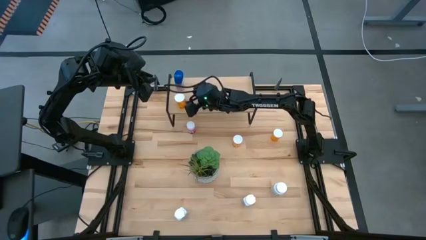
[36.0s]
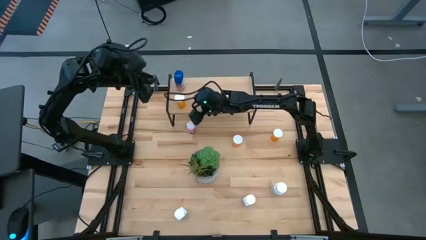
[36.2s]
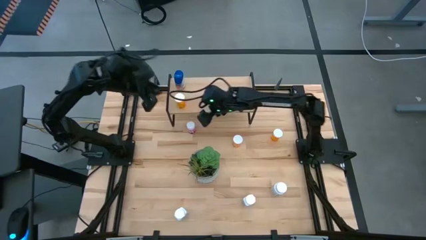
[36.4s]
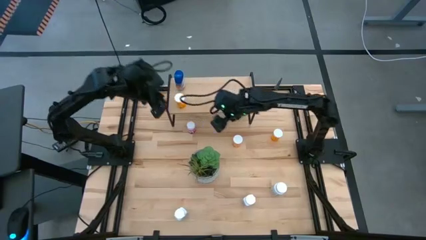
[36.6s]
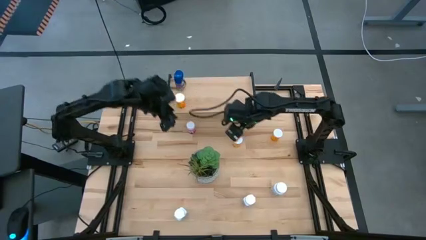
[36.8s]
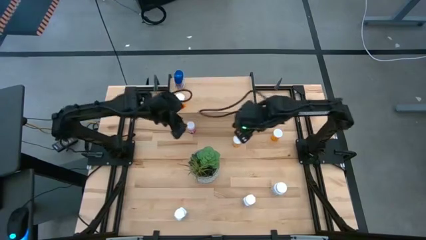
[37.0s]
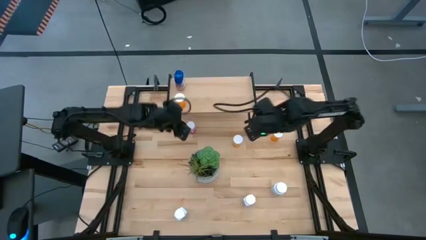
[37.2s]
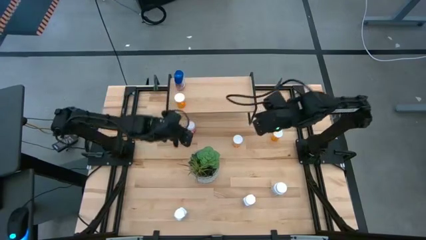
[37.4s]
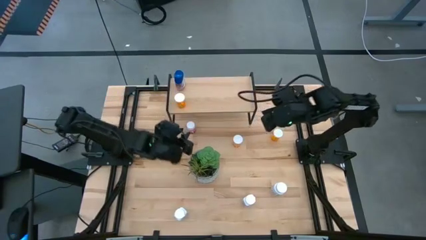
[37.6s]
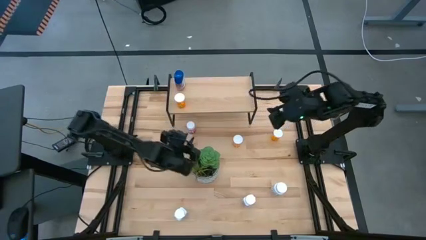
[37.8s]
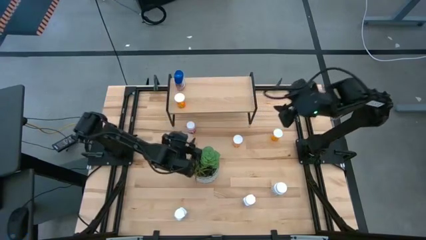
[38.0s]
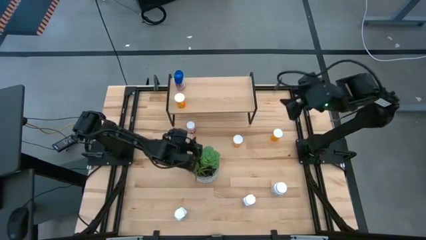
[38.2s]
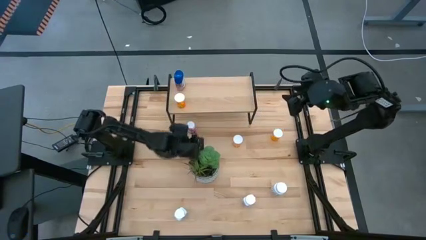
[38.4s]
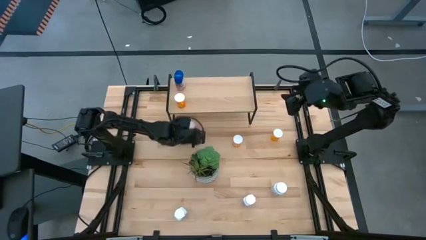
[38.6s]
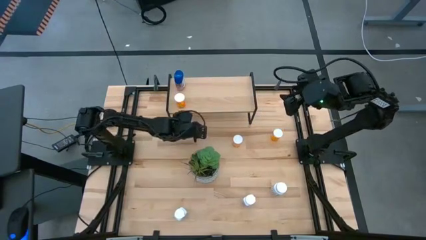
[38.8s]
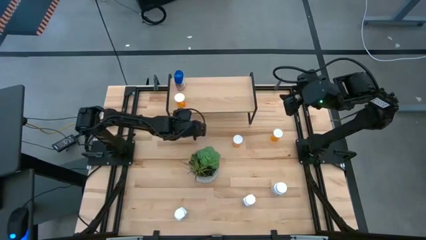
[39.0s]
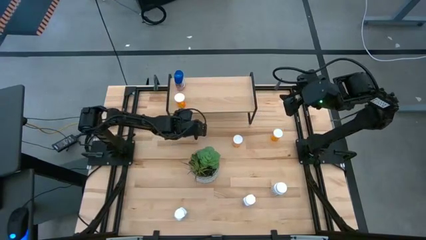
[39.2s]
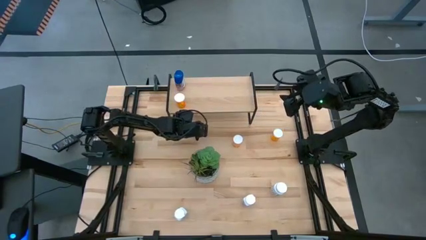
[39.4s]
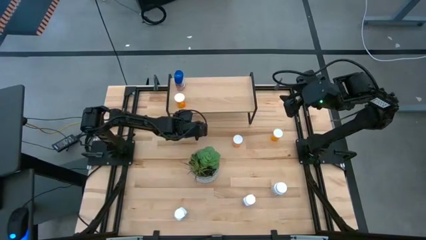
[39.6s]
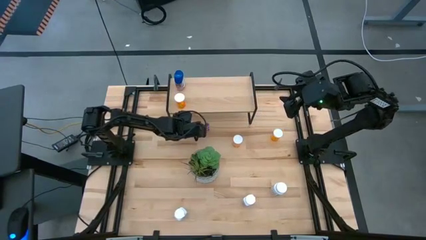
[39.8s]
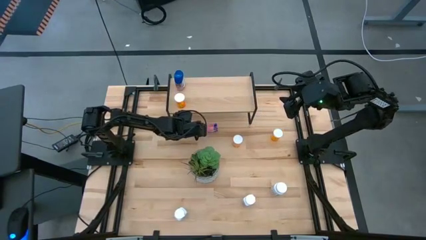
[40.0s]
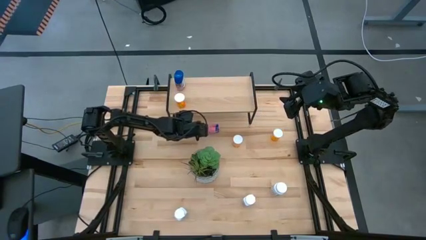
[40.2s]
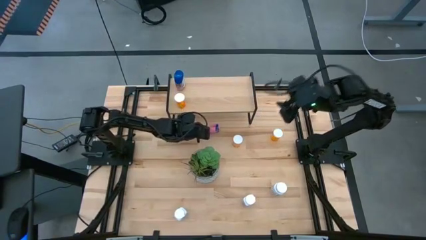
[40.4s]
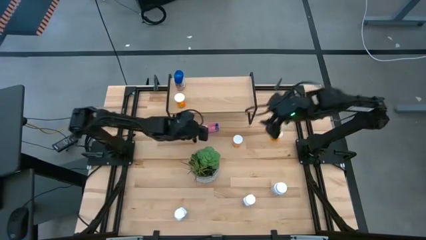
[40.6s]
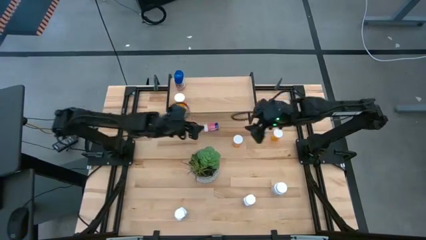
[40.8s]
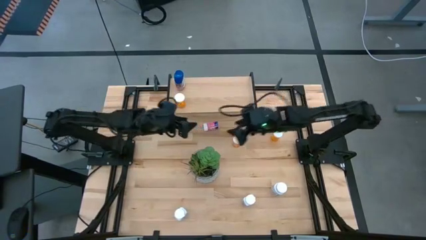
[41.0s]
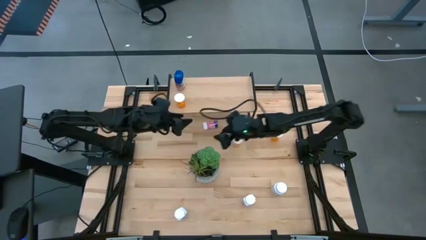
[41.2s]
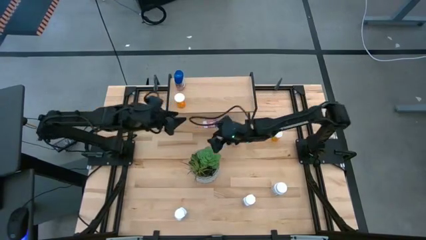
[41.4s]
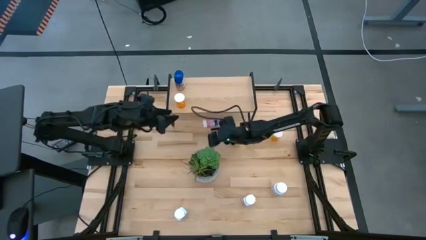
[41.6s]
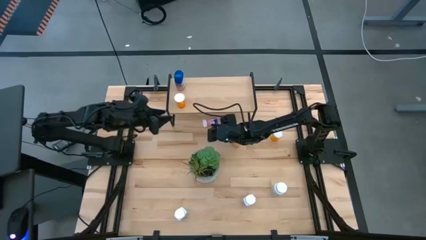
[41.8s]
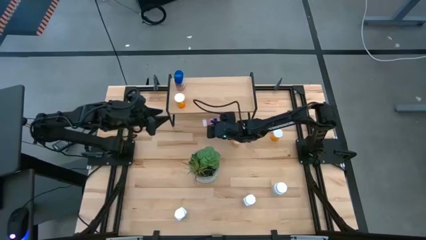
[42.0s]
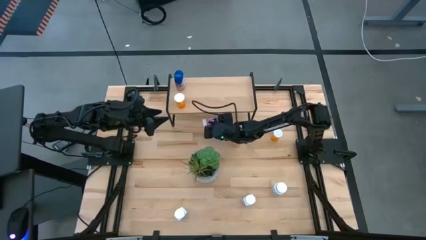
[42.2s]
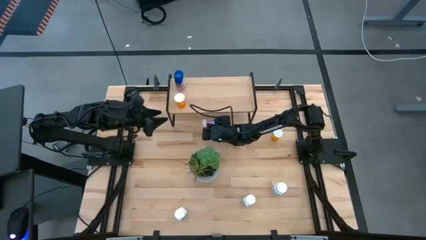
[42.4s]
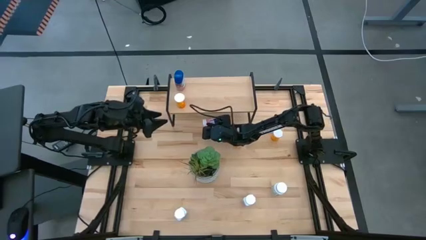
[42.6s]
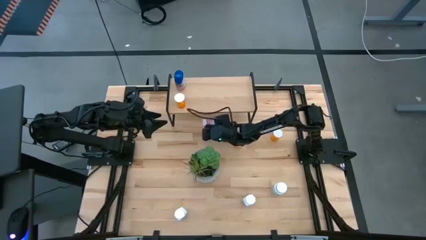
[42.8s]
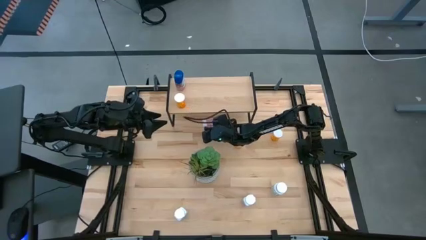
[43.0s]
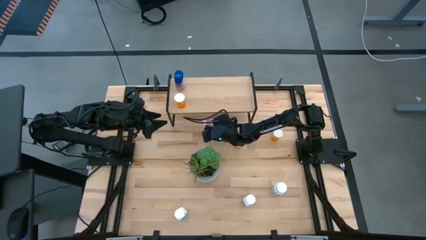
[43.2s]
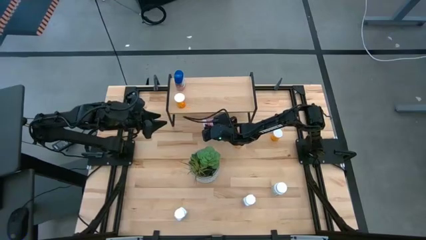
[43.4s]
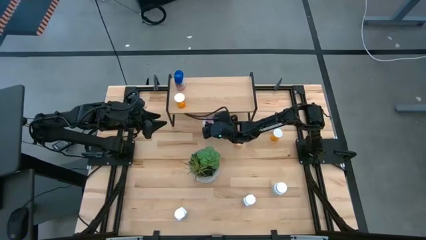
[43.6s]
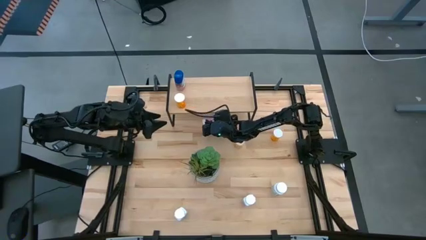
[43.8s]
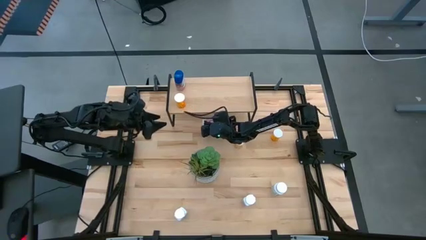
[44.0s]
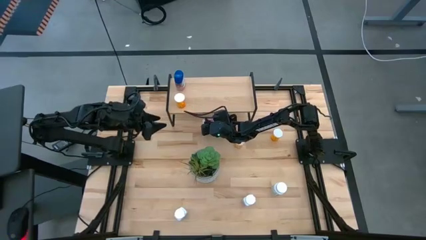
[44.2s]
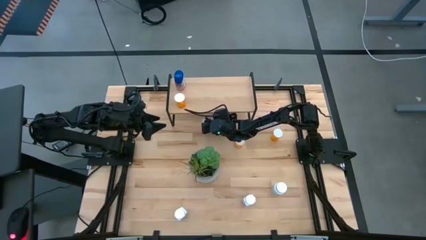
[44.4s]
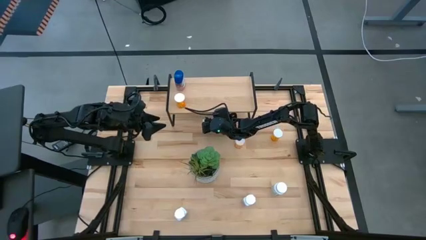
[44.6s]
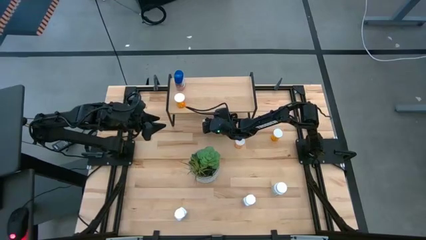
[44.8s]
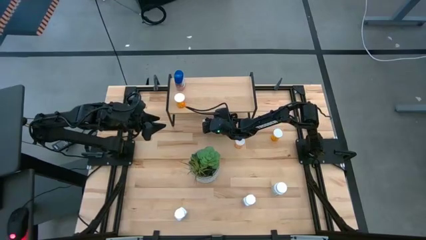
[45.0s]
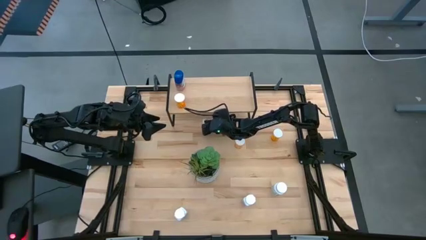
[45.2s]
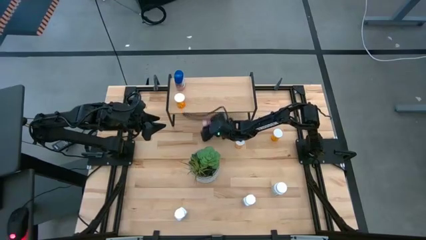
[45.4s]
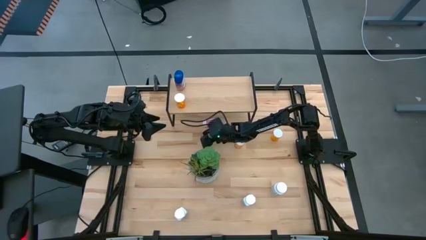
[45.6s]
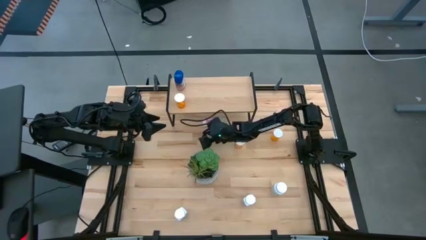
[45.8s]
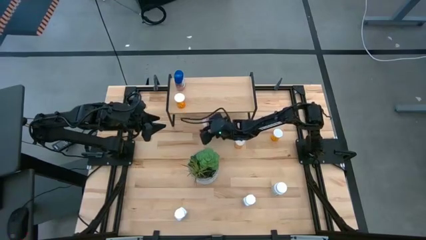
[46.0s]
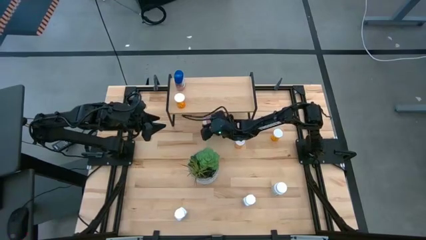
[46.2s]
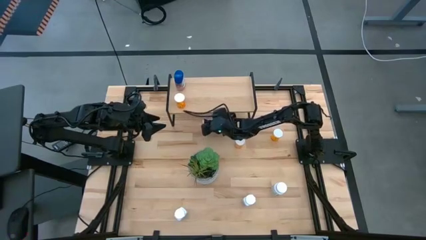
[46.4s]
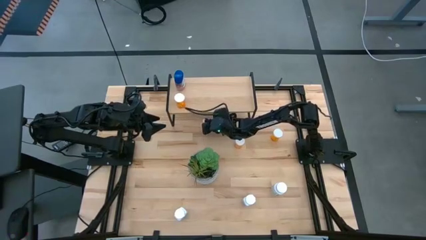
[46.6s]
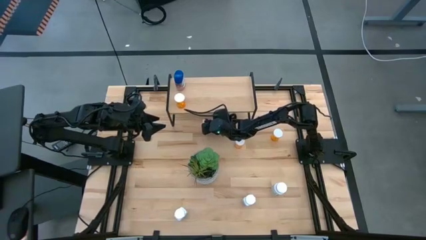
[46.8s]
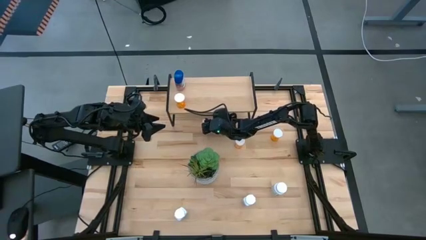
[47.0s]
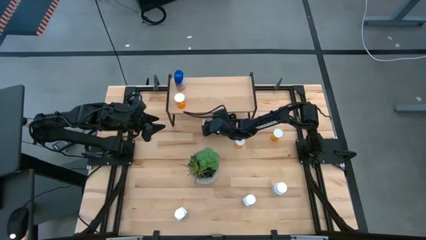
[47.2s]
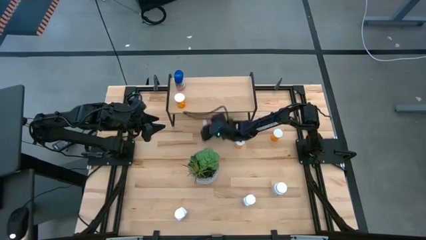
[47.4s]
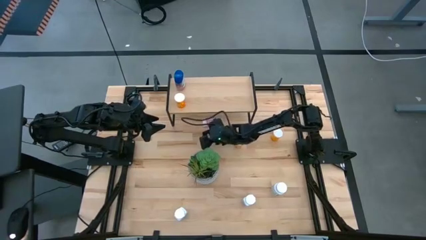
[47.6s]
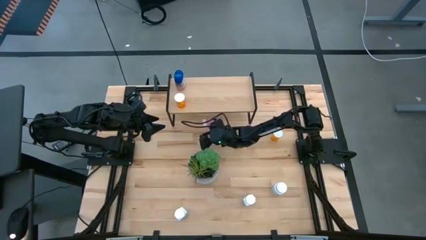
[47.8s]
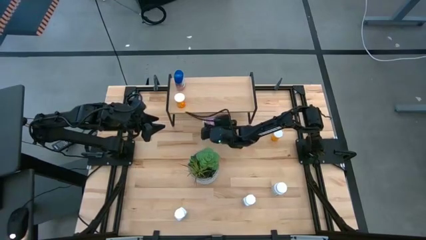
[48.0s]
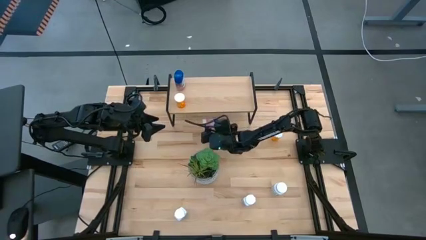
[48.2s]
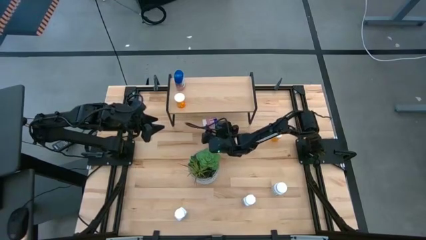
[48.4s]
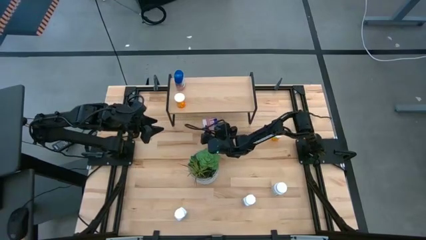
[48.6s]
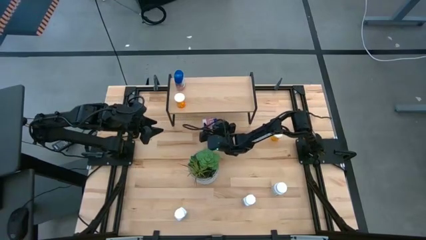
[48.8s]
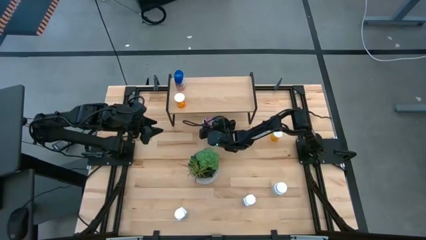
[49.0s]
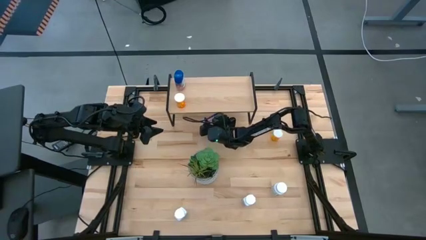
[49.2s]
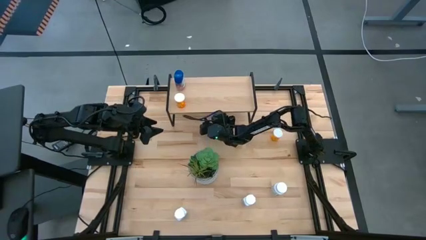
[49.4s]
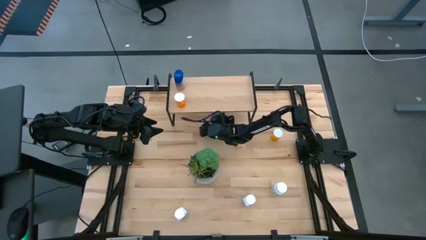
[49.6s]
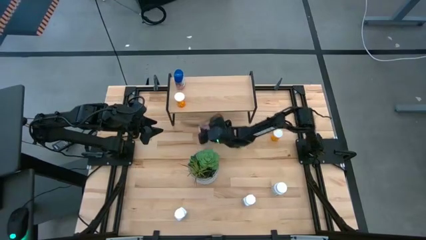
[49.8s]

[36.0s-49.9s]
Task: Pick and place medicine bottles onto shelf by color
Put the pink pill bottle on the shelf
